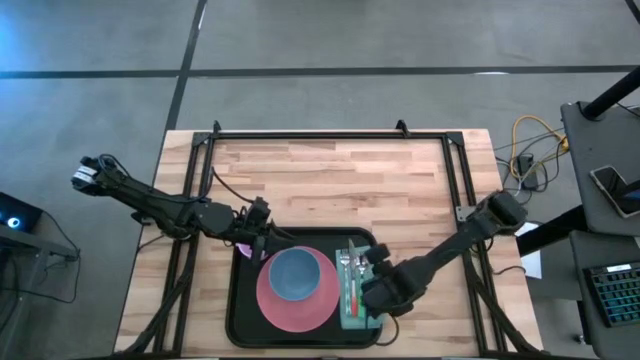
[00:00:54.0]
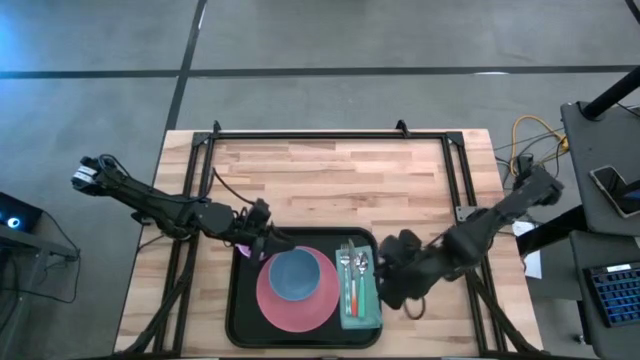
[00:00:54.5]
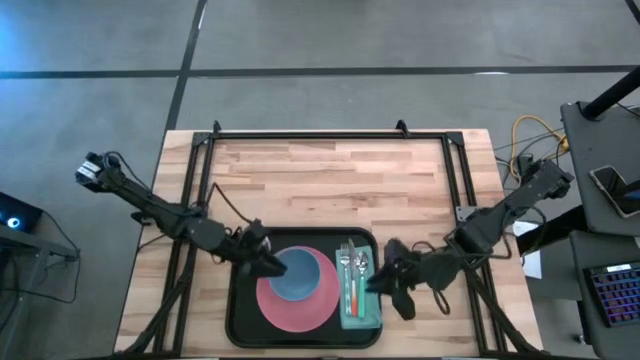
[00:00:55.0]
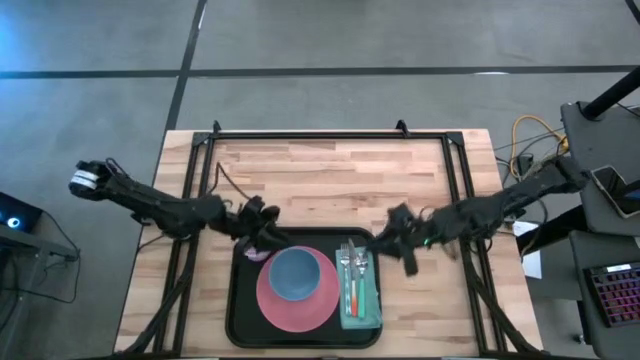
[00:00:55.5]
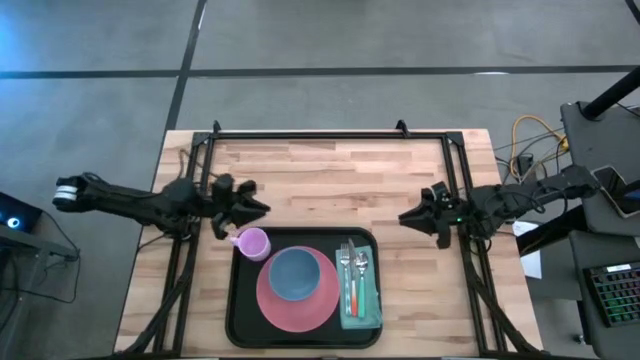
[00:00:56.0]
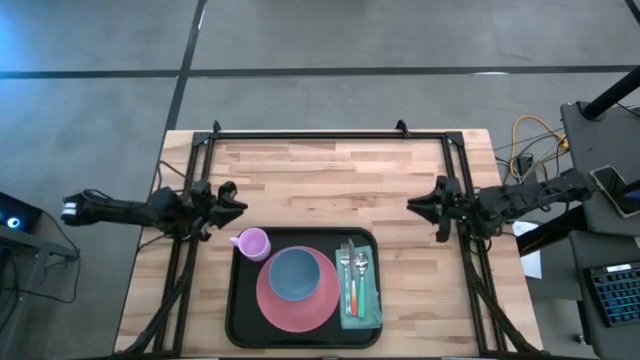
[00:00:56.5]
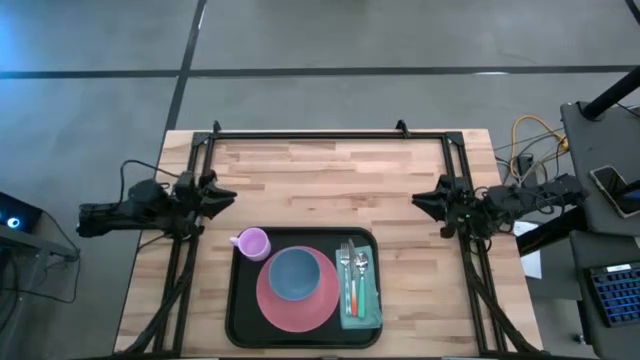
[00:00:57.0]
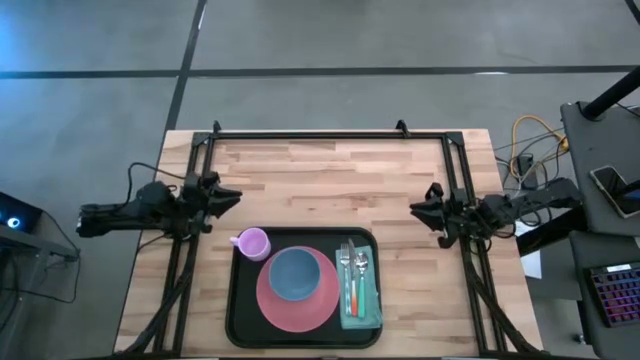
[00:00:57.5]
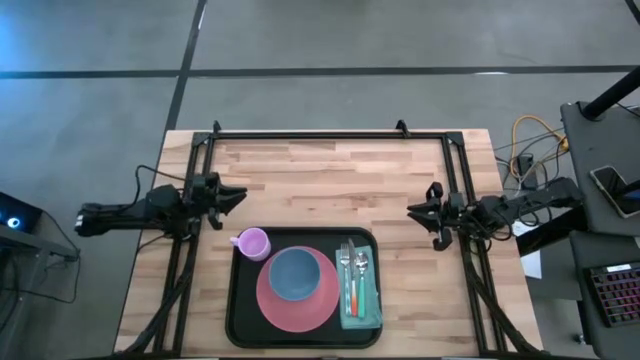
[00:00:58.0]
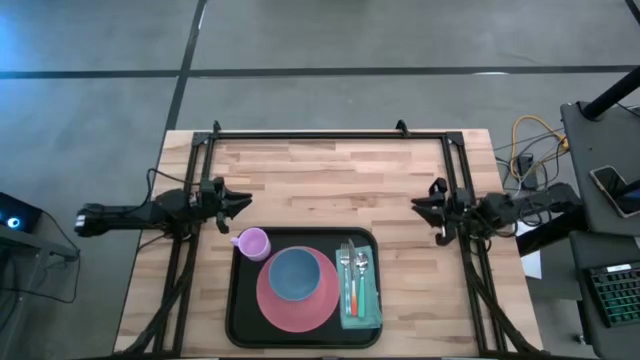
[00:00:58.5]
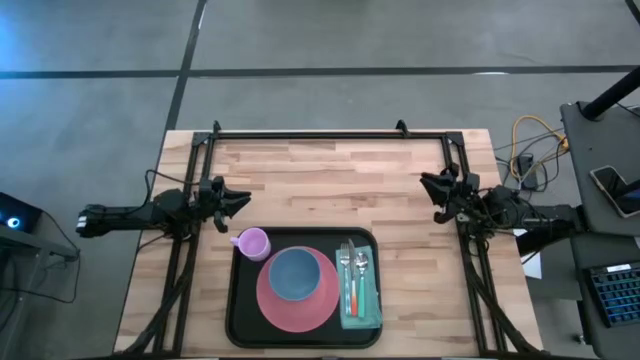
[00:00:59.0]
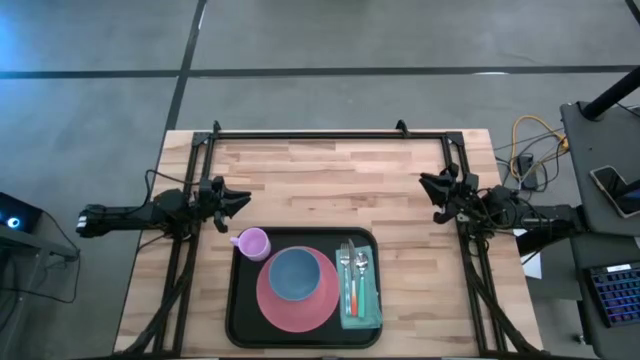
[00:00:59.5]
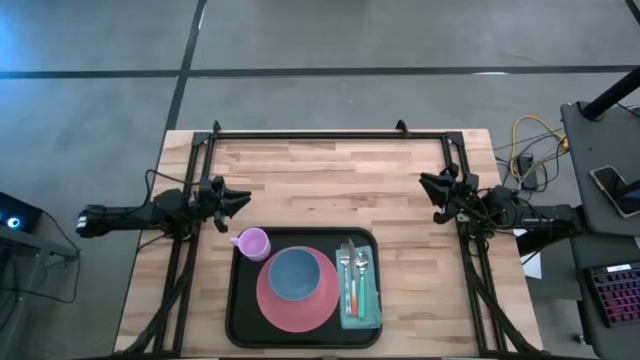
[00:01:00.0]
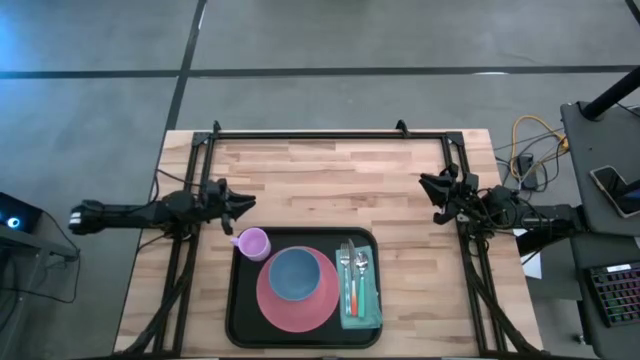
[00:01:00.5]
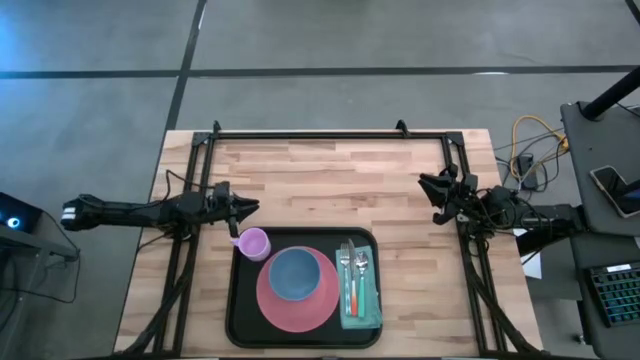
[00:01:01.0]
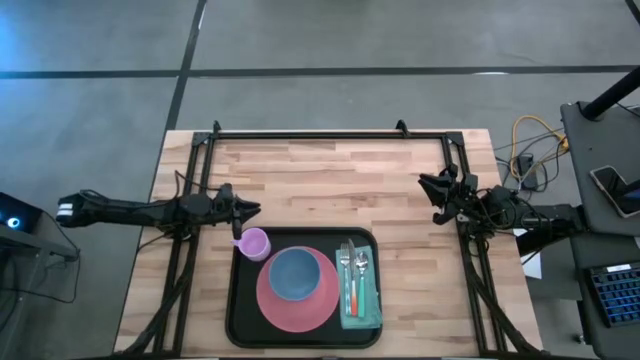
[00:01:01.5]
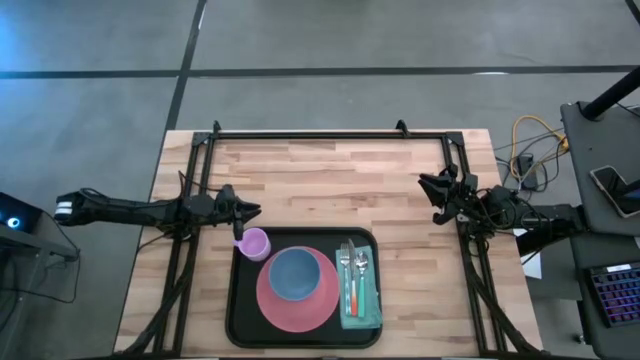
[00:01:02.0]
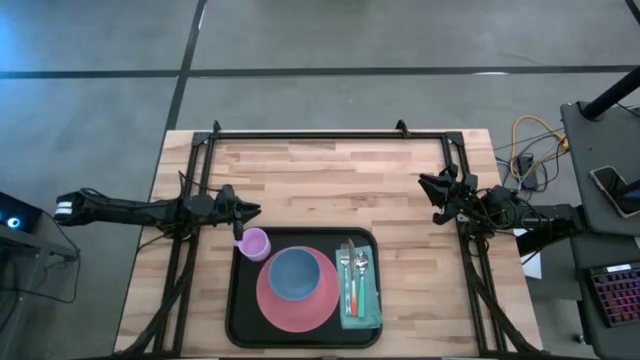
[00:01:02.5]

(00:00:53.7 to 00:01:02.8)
Task: Set up tray
Return to Home Position

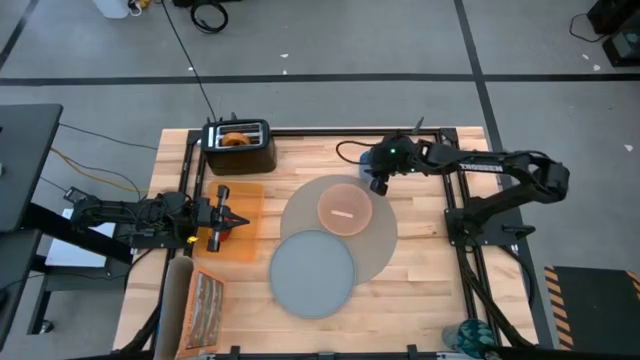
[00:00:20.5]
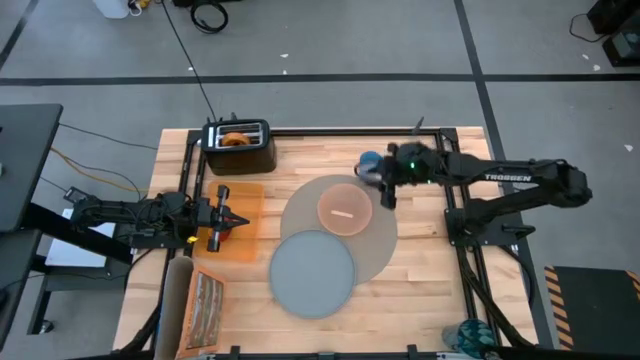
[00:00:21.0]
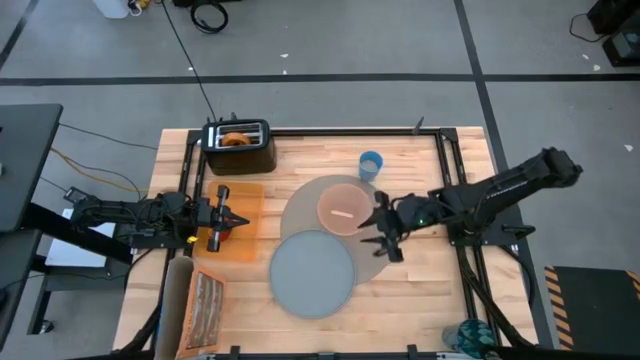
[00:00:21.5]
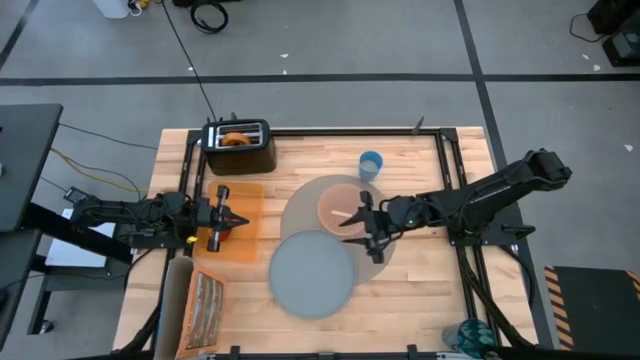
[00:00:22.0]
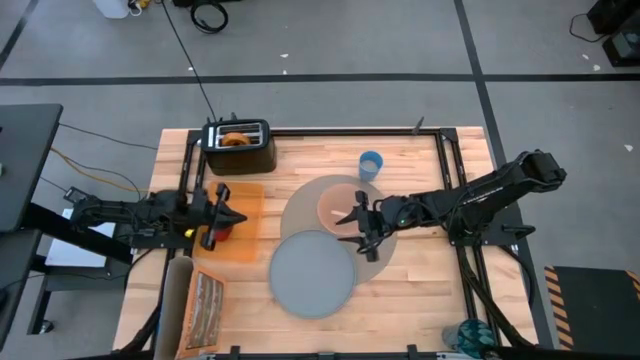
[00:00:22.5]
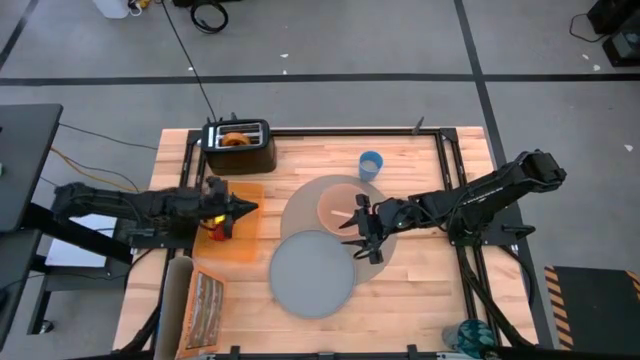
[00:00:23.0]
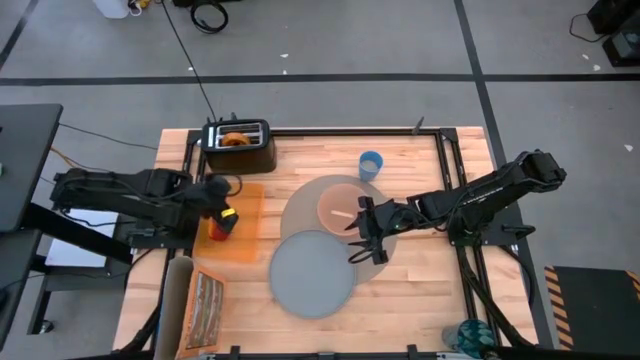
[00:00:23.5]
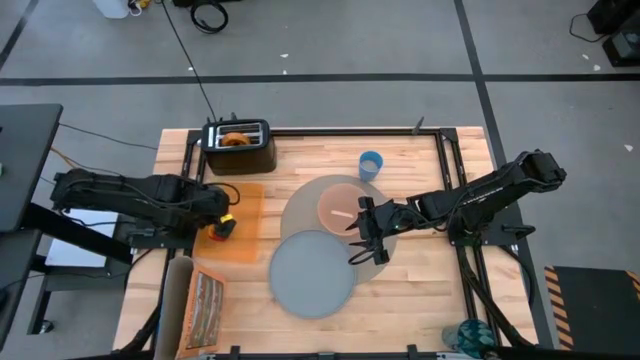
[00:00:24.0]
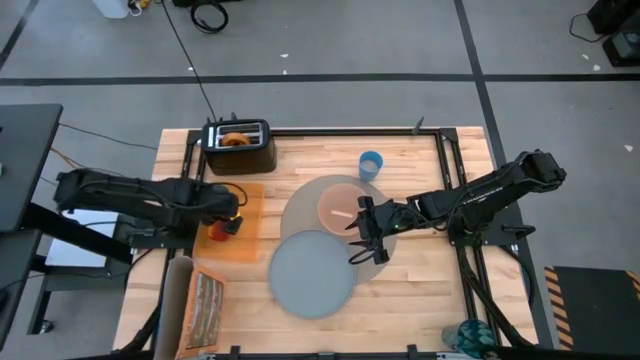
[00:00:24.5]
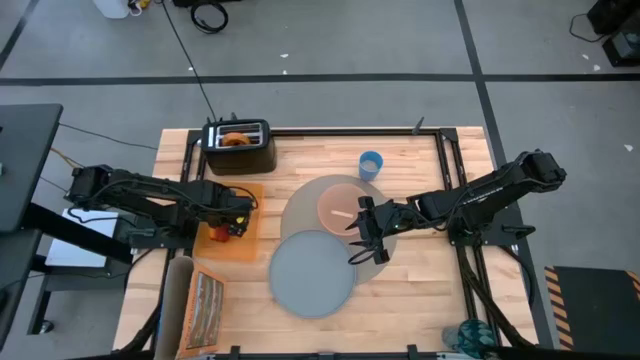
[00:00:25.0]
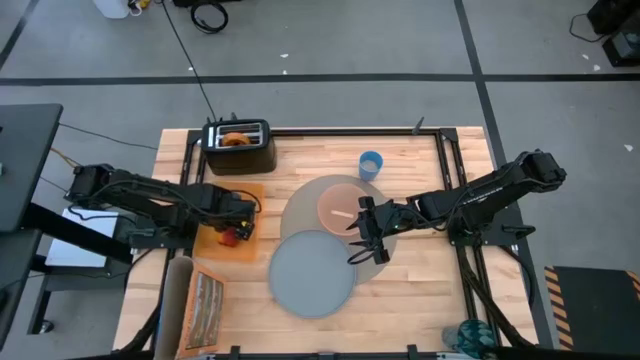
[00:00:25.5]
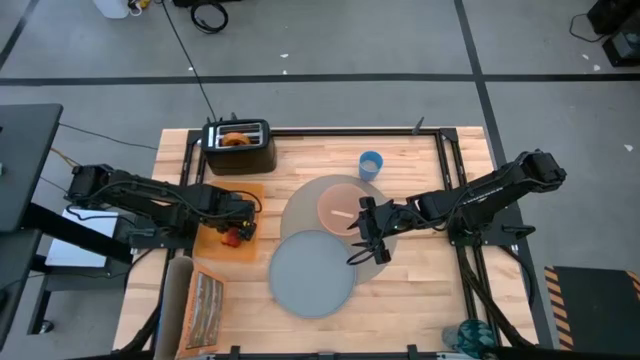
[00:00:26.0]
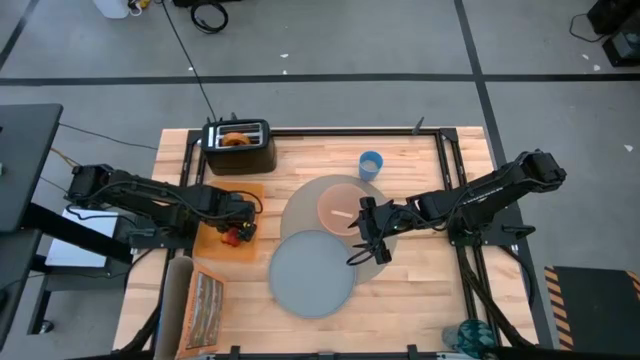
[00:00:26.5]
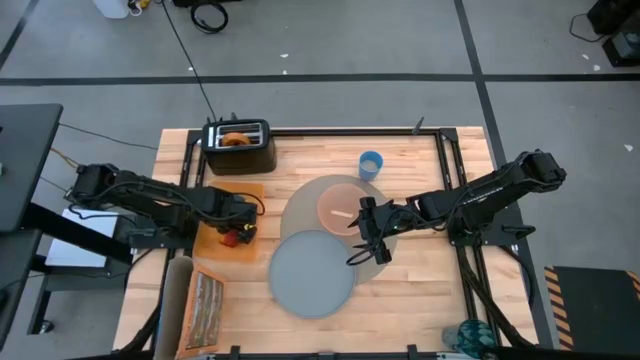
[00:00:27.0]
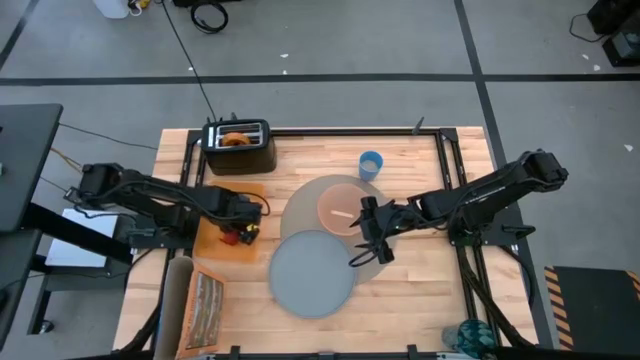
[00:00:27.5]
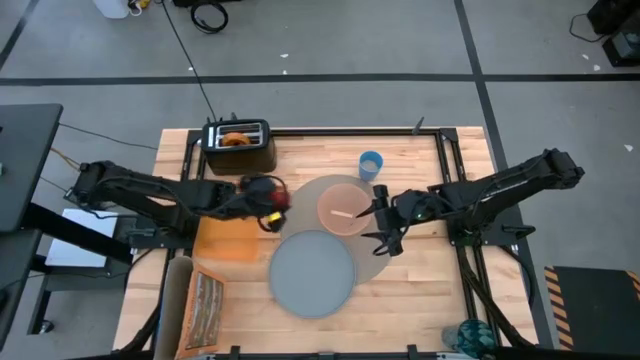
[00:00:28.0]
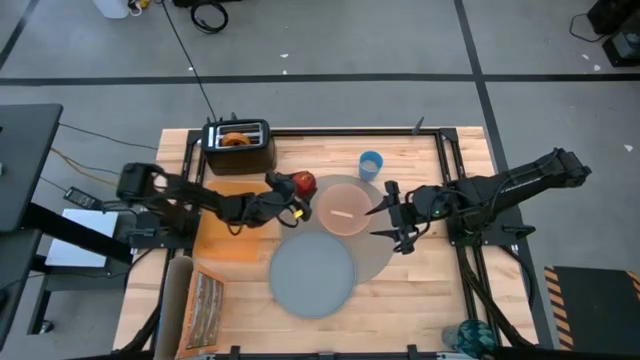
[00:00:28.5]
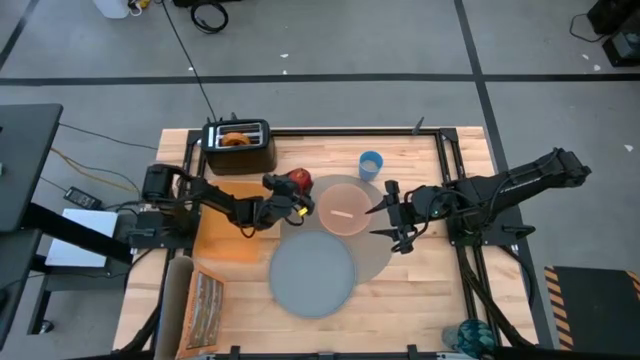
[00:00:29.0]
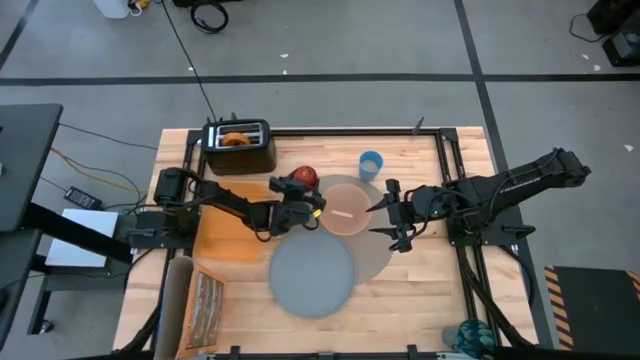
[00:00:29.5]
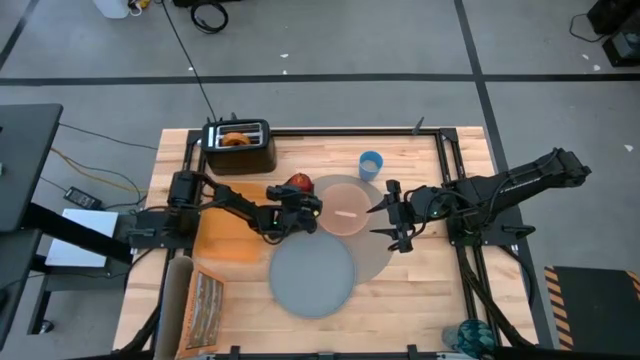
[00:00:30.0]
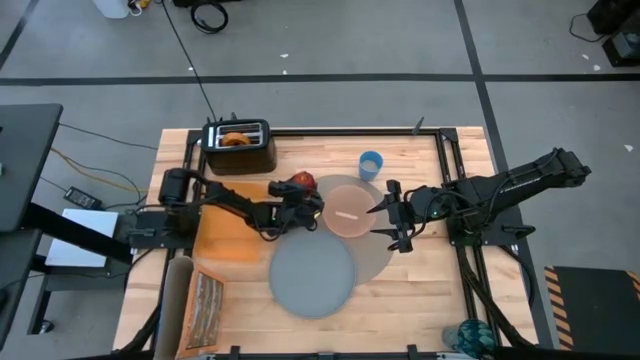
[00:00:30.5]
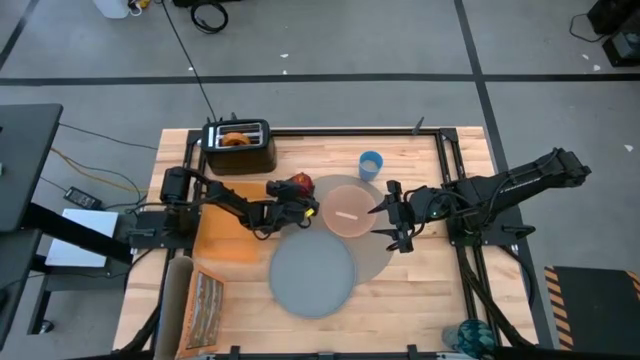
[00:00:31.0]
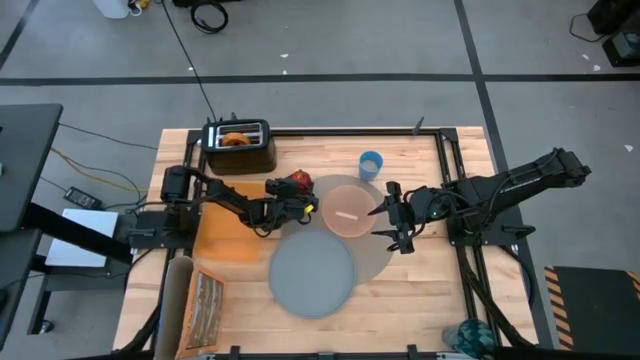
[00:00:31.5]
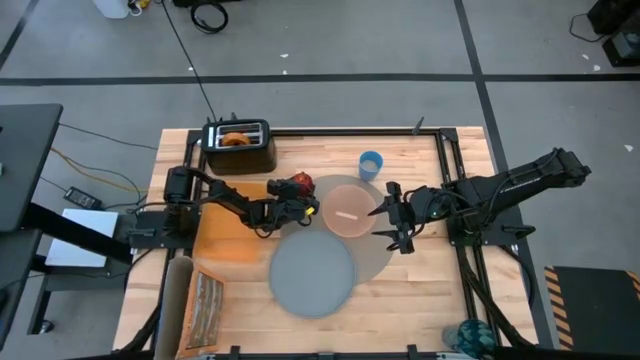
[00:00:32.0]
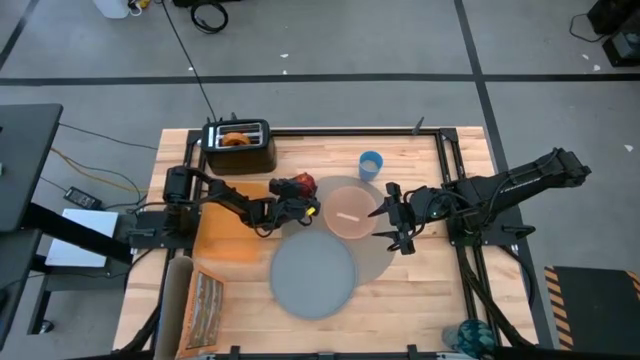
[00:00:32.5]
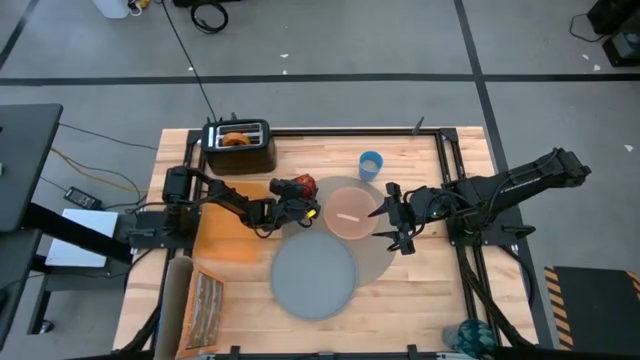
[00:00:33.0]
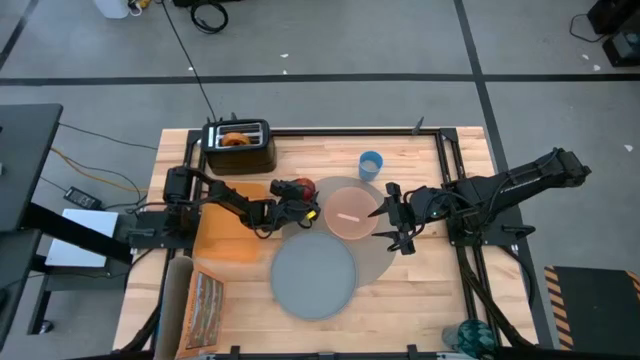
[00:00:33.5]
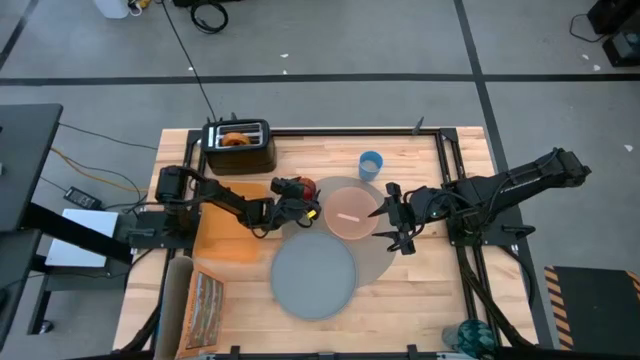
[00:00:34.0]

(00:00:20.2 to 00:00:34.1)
Task: Arrange a breakfast setting
Put the apple from the orange bin on the table mat
